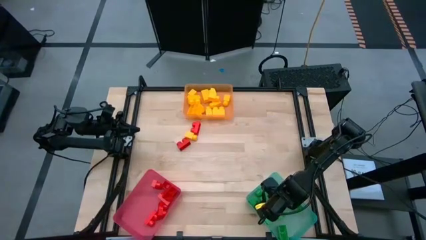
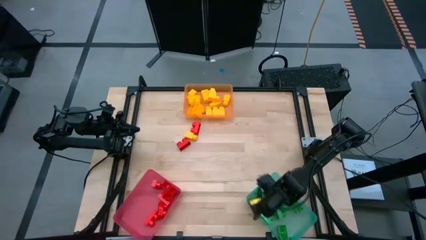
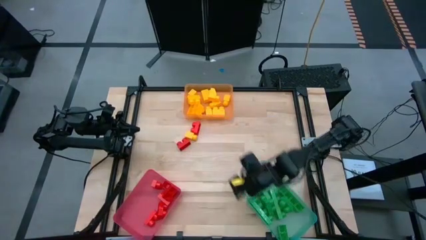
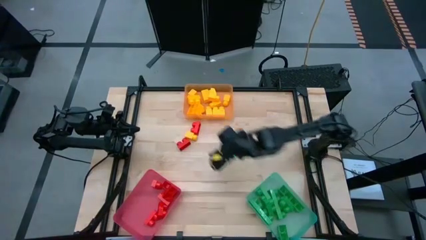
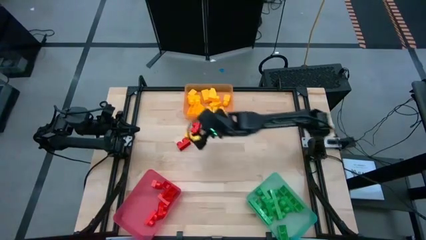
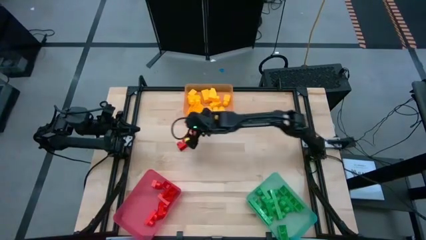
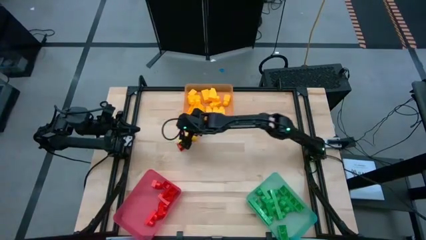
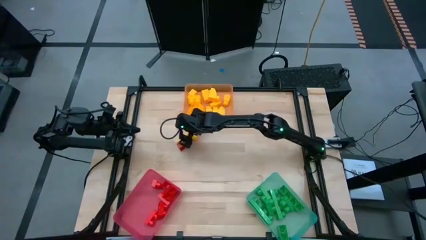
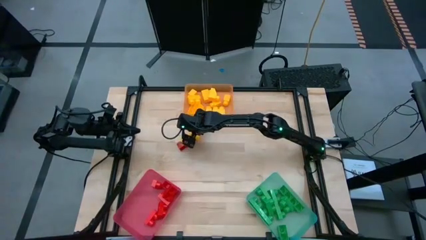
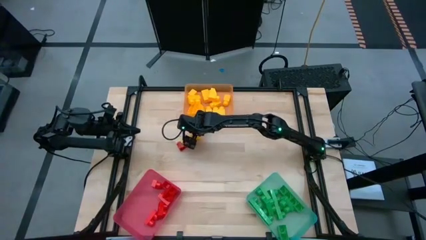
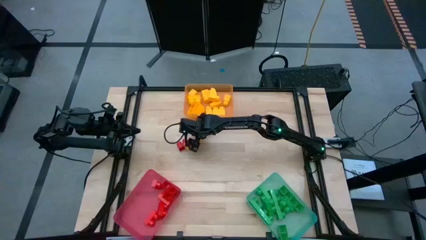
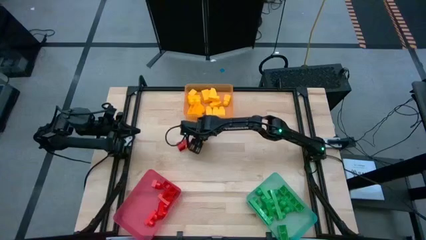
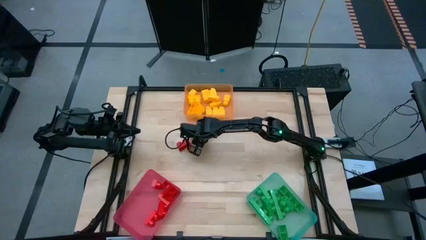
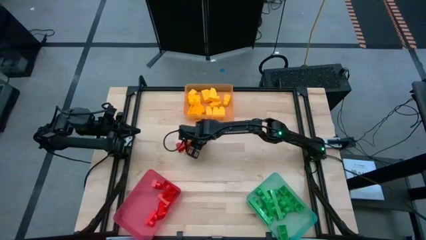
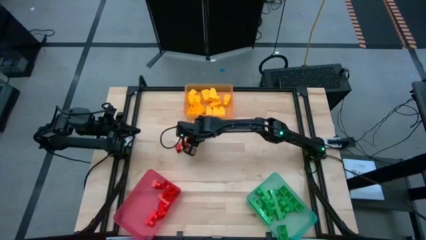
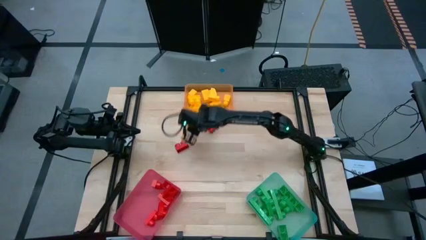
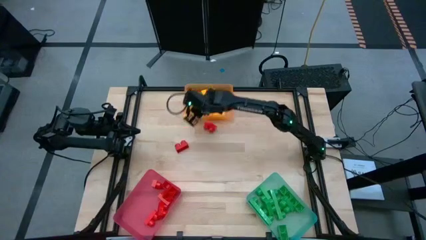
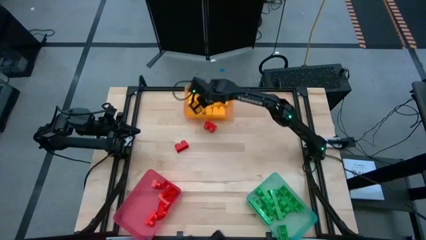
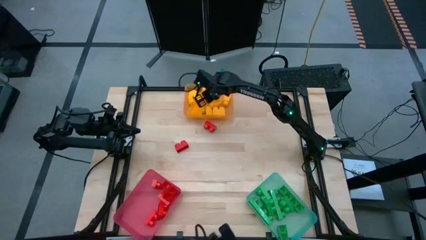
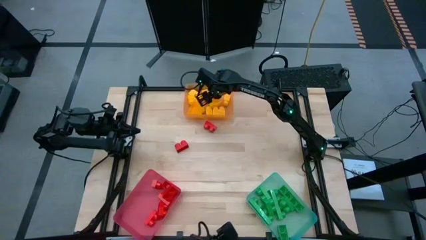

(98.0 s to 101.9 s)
Task: Sort blocks
Put the yellow 1 stud game piece into the orange bin

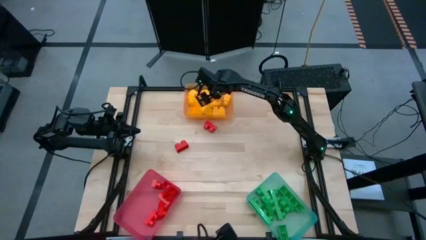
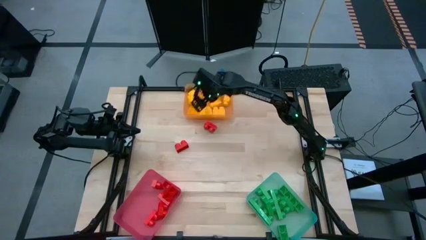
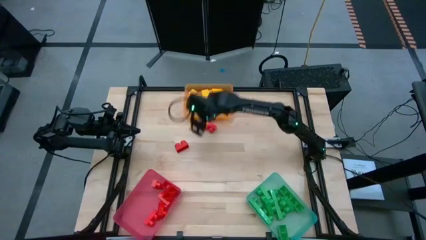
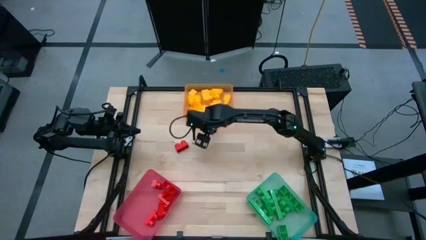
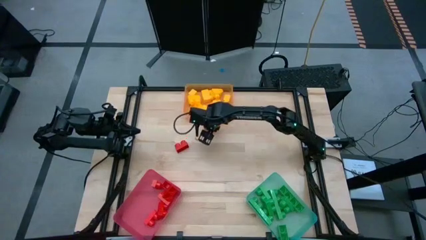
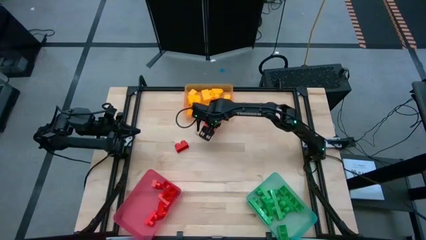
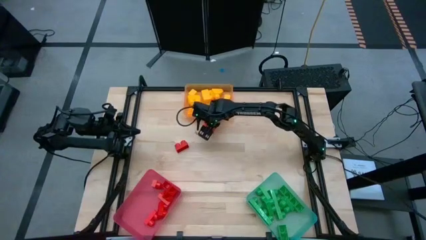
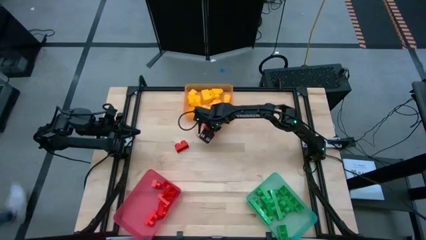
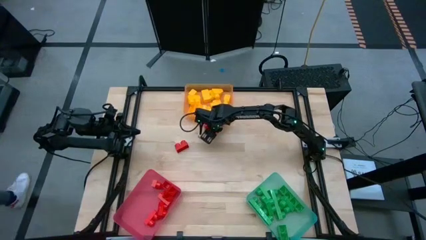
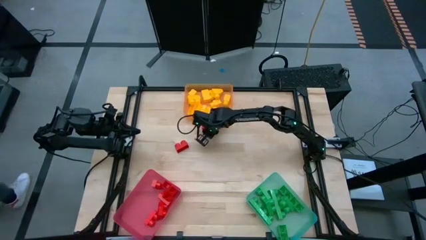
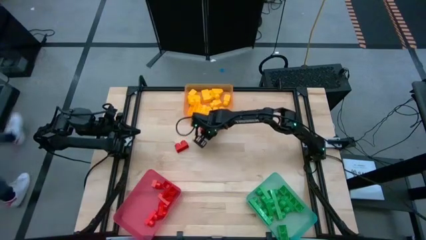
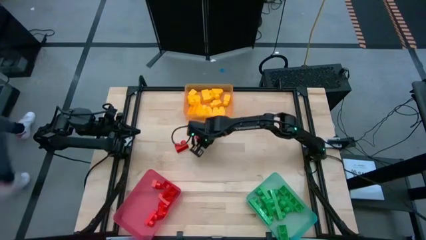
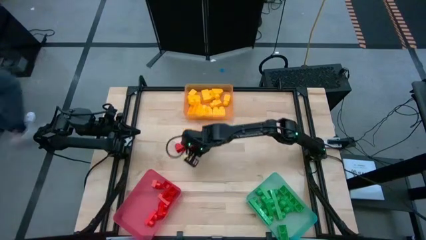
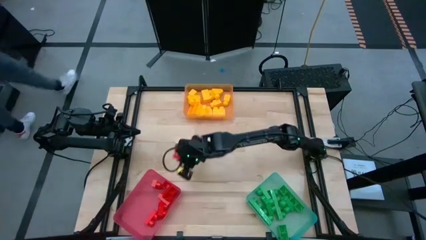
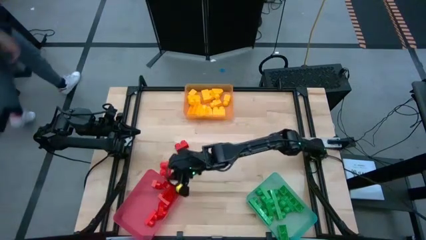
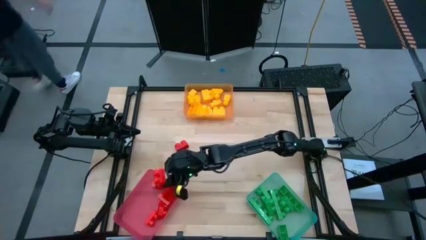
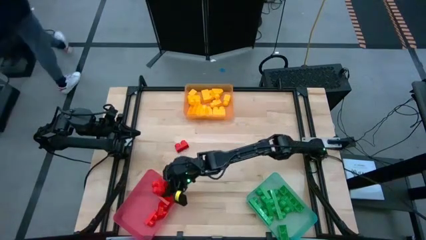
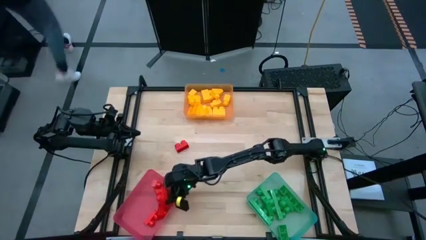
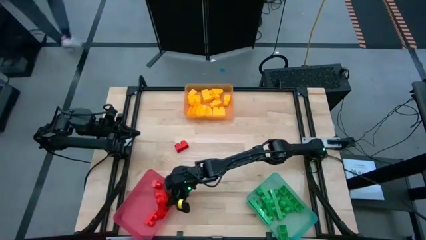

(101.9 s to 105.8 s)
Put the red 2 stud game piece into the pink bin

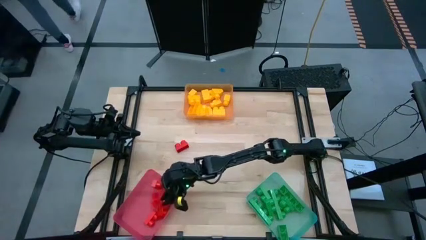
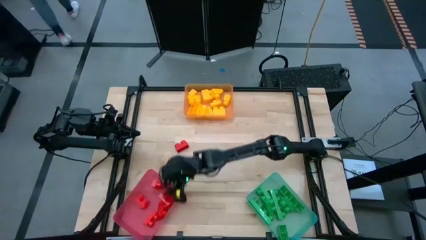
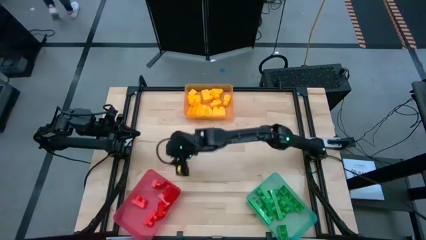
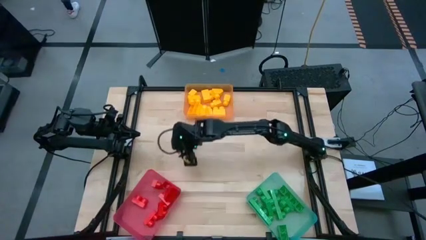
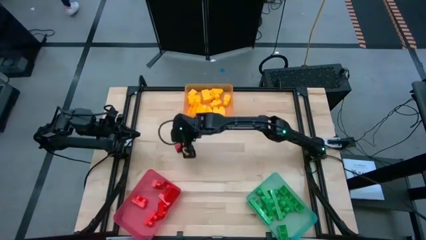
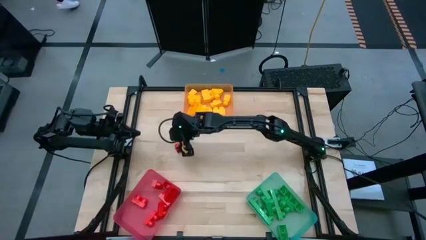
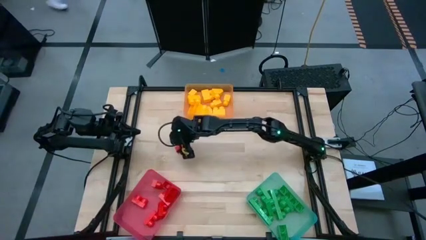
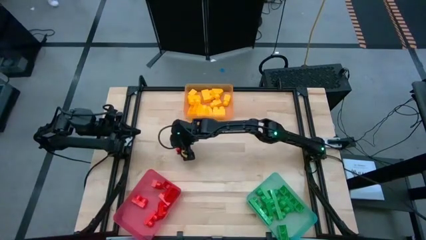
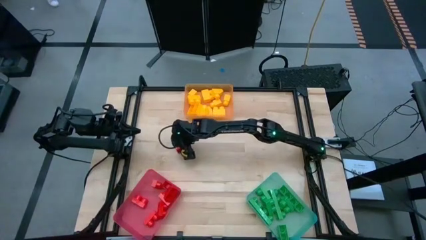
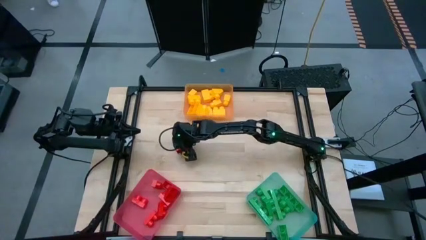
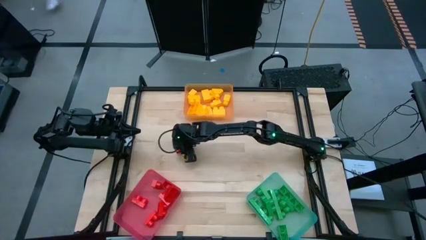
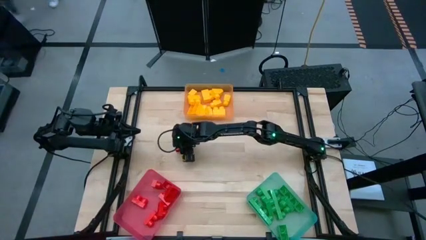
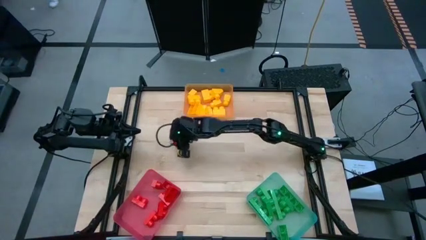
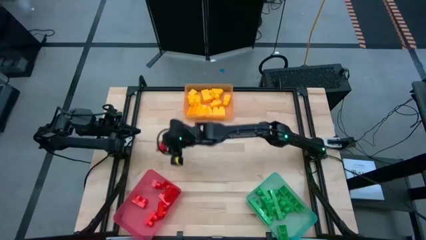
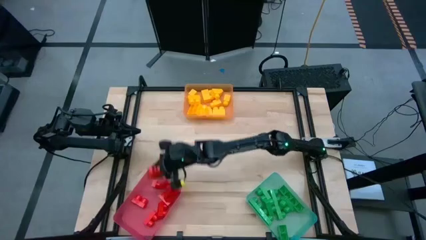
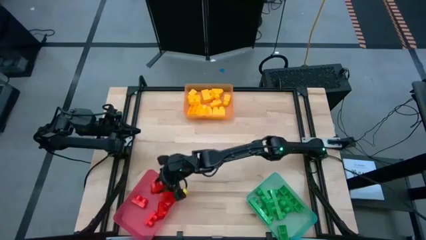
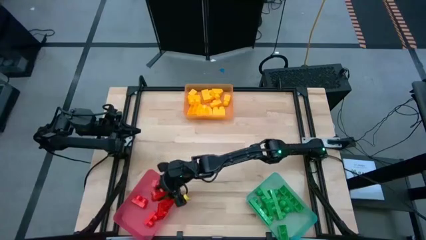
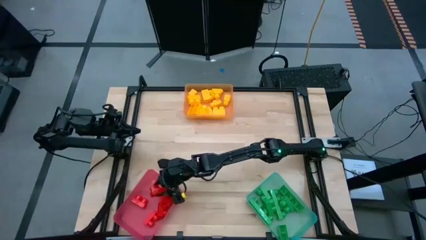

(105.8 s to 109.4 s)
Put the red 2 stud game piece into the pink bin

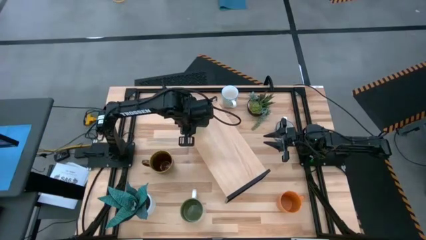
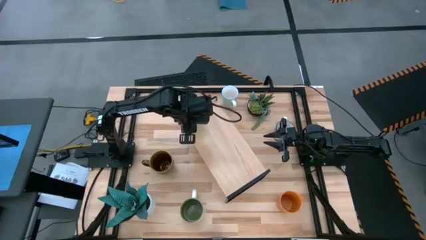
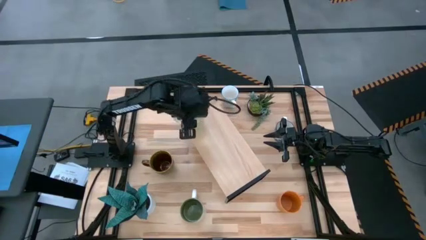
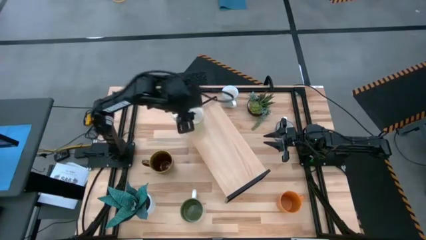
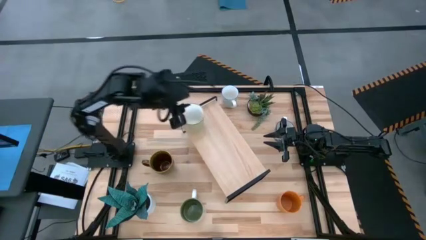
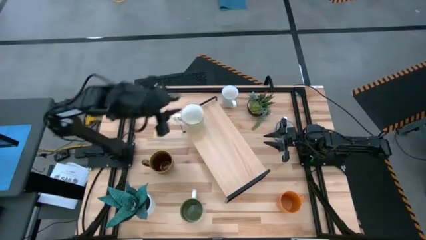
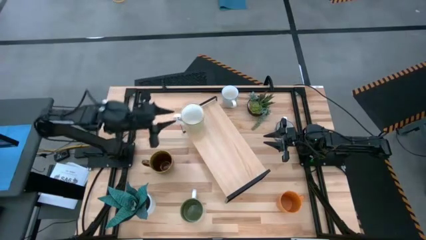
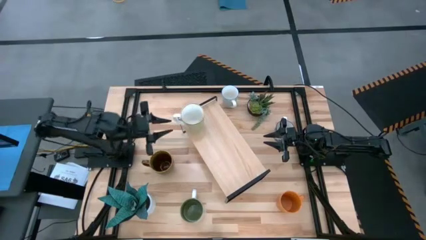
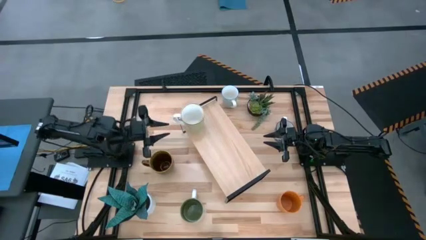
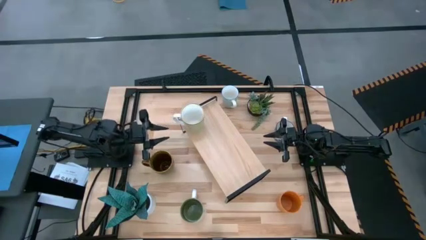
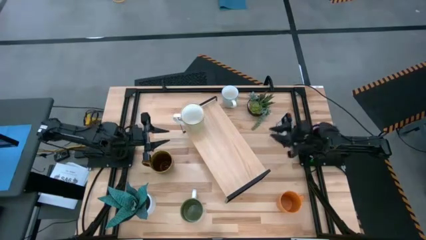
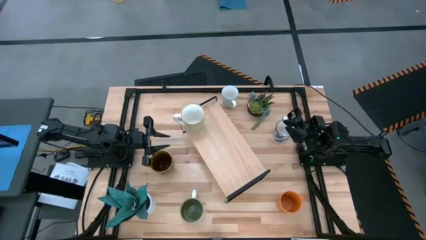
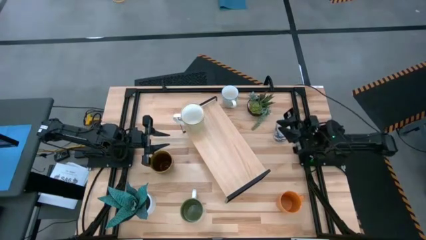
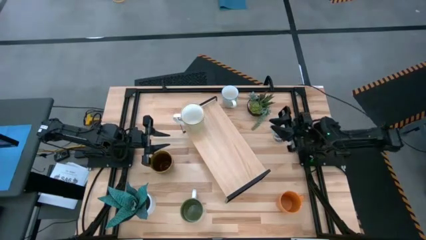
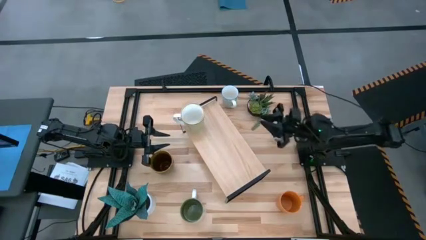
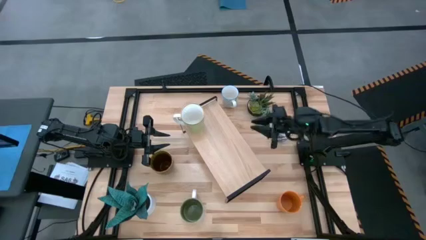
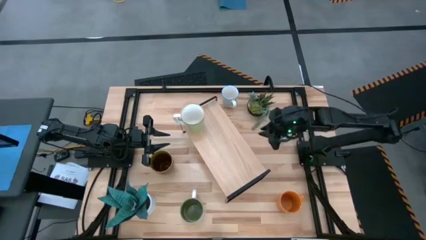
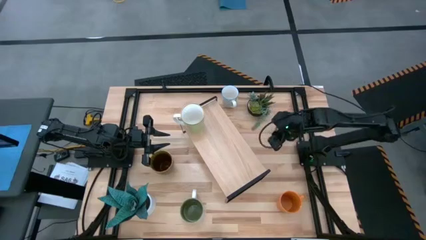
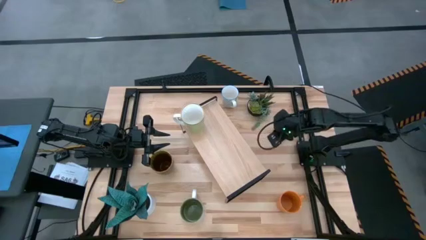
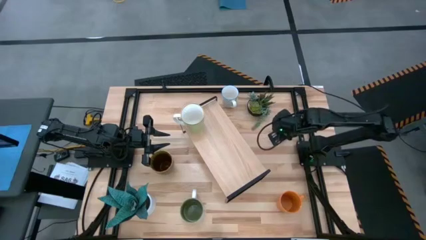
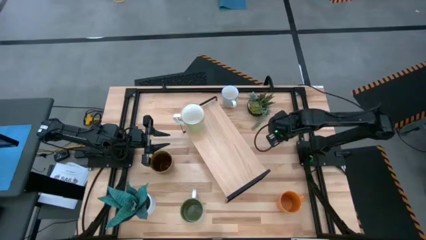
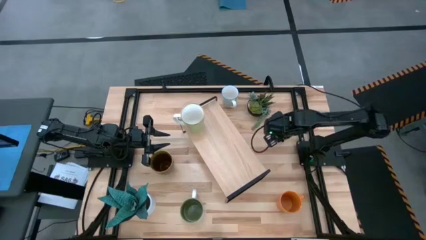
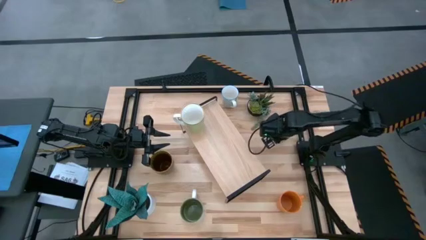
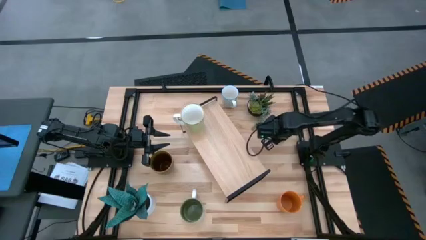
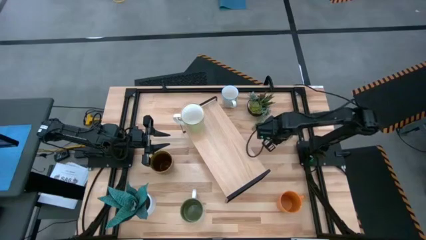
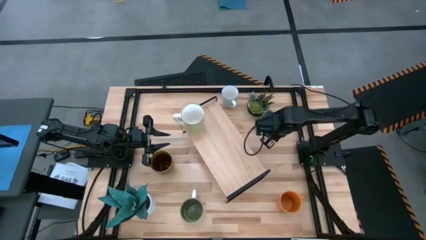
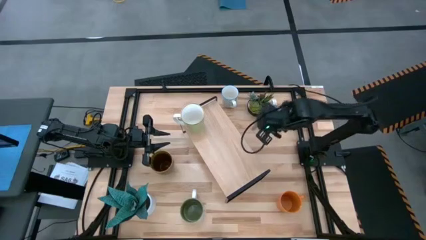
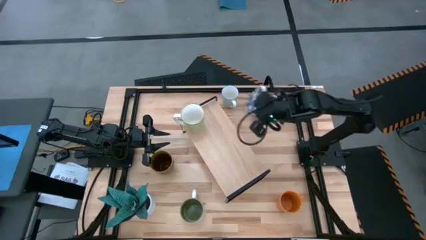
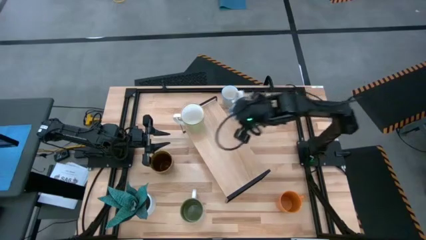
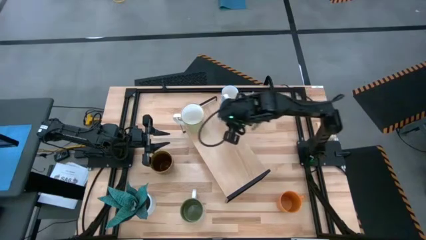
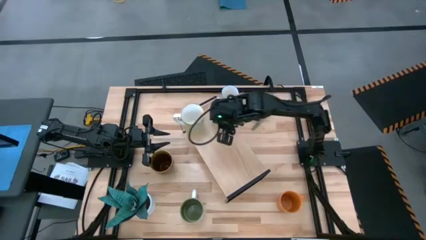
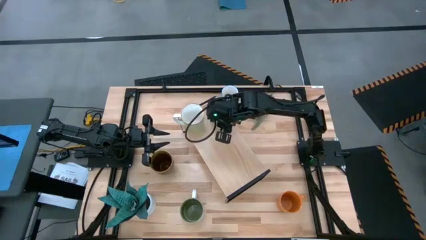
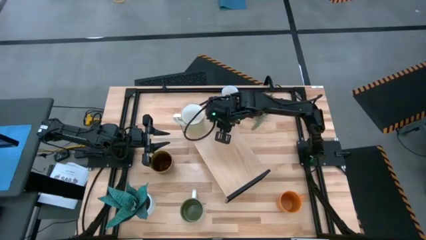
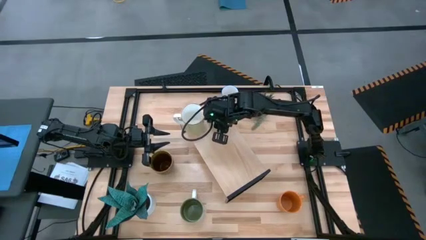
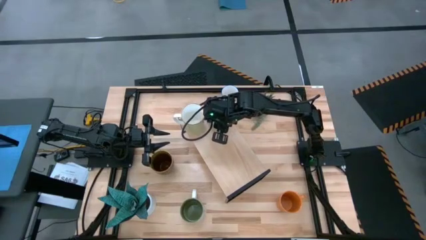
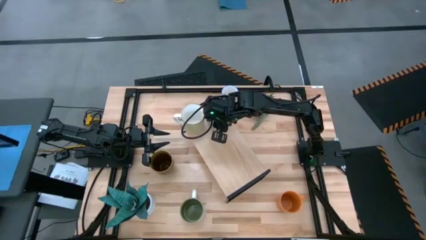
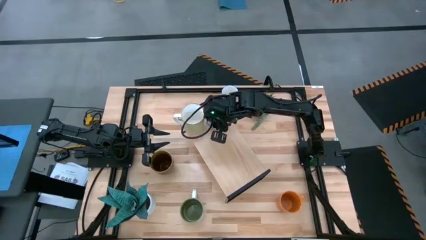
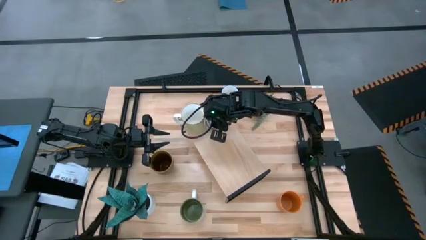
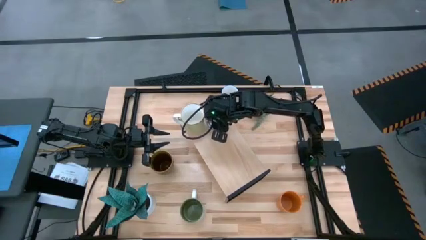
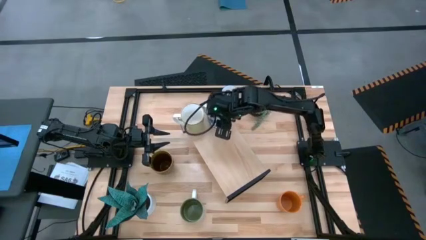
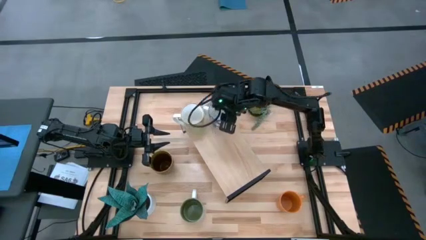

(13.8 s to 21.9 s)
Task: Place coffee mugs
Put the blue patterned mug on the shelf
